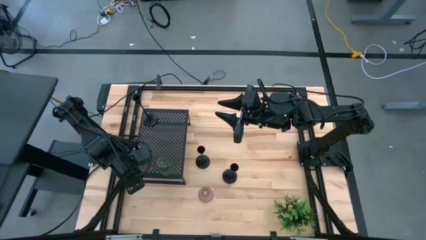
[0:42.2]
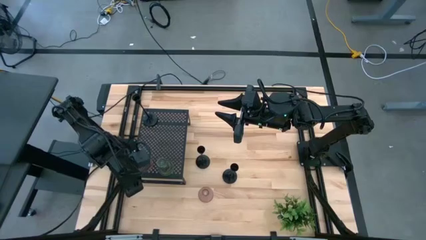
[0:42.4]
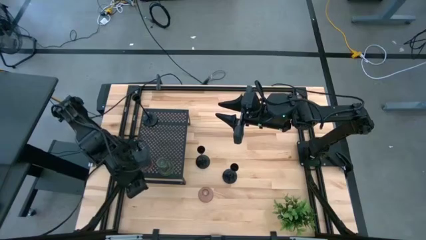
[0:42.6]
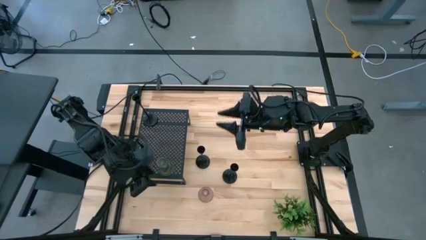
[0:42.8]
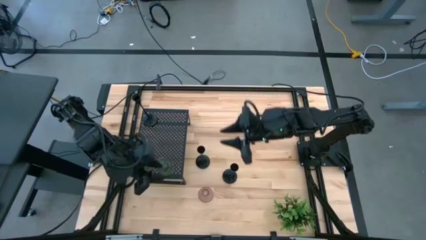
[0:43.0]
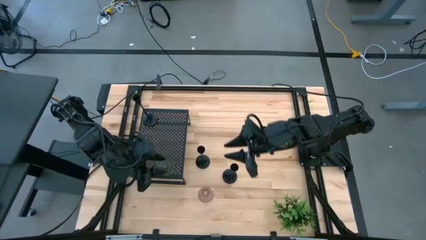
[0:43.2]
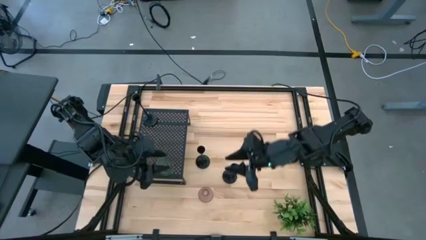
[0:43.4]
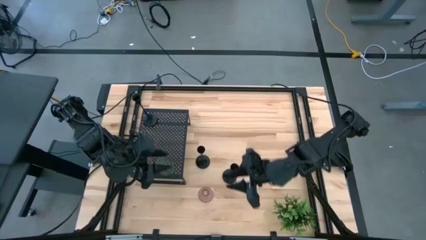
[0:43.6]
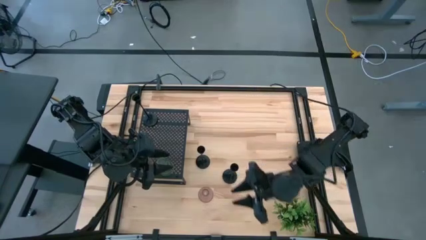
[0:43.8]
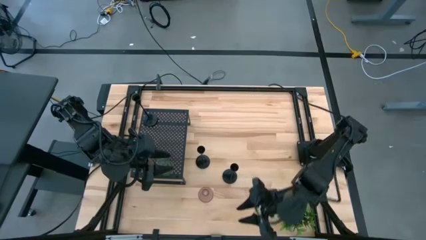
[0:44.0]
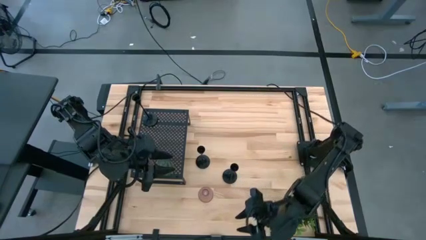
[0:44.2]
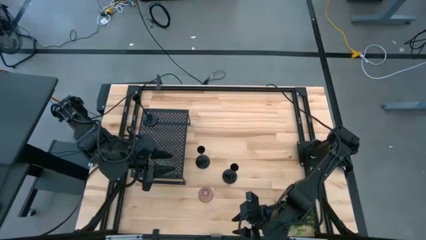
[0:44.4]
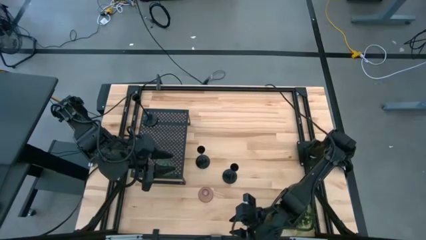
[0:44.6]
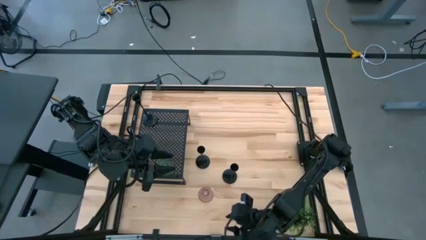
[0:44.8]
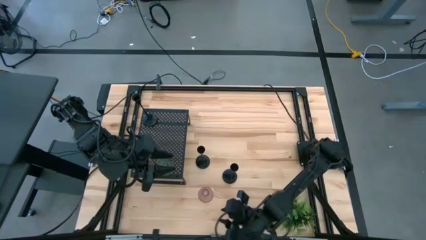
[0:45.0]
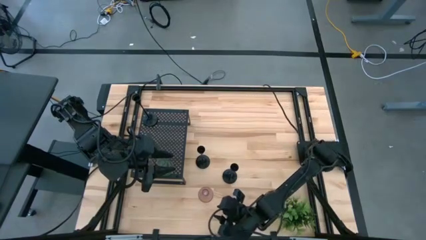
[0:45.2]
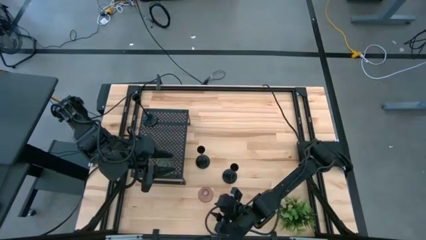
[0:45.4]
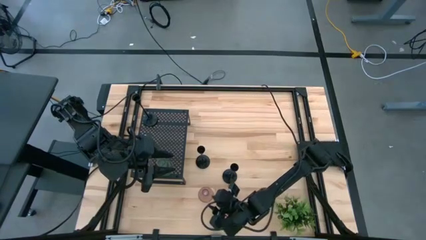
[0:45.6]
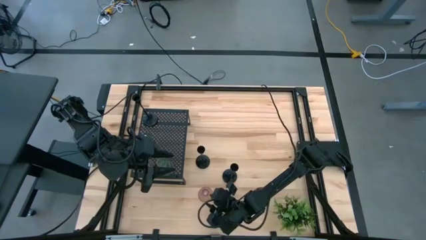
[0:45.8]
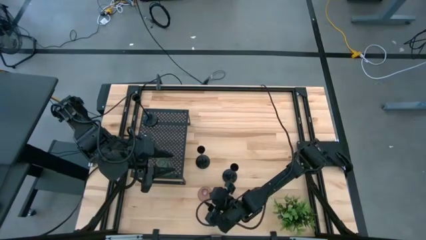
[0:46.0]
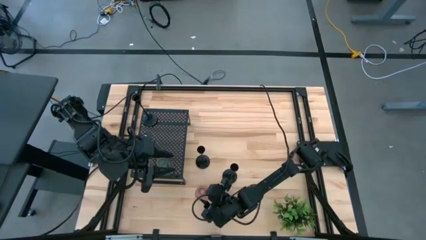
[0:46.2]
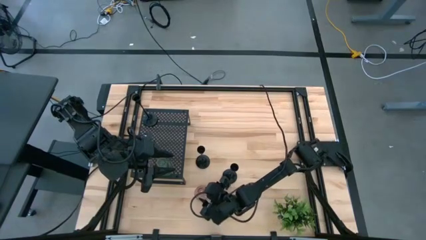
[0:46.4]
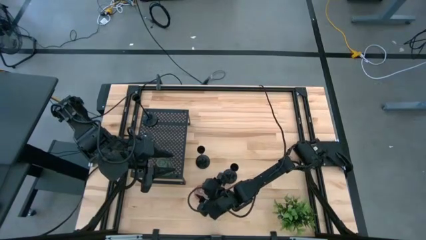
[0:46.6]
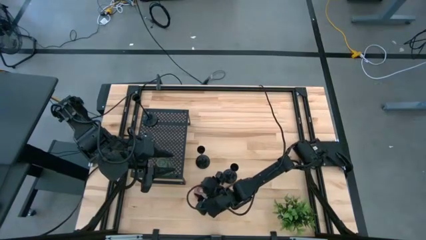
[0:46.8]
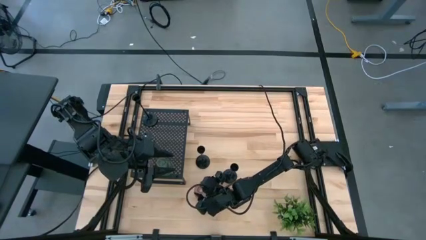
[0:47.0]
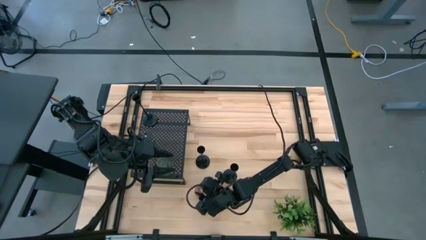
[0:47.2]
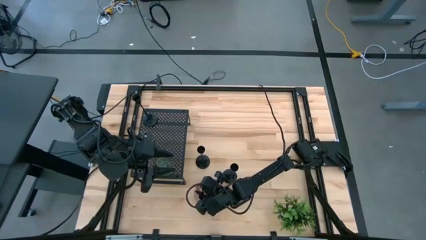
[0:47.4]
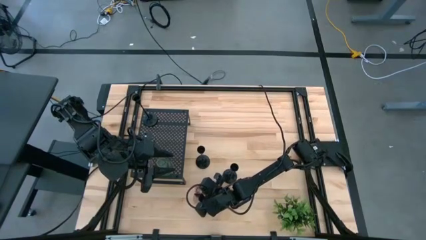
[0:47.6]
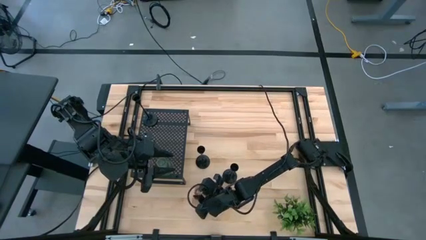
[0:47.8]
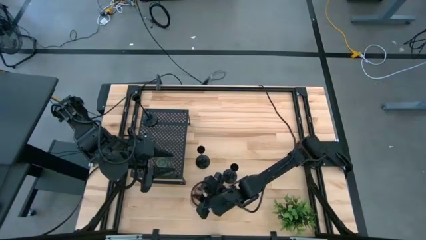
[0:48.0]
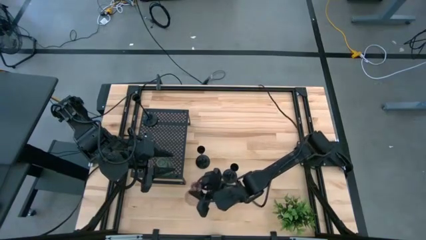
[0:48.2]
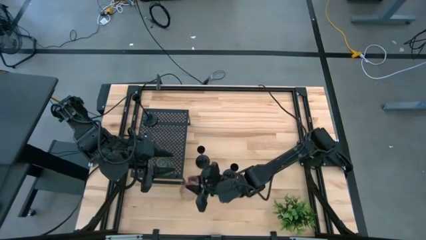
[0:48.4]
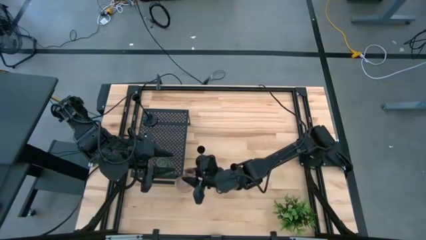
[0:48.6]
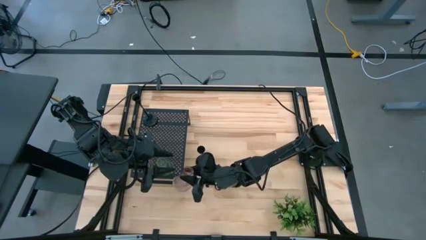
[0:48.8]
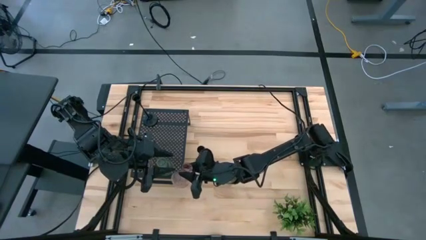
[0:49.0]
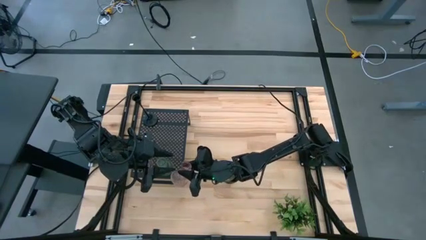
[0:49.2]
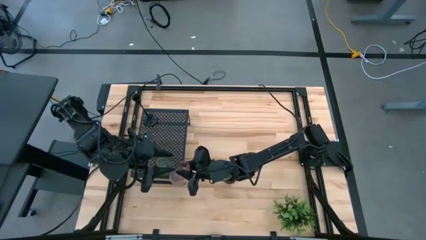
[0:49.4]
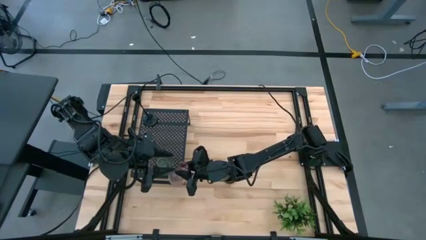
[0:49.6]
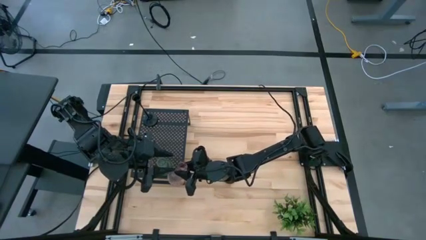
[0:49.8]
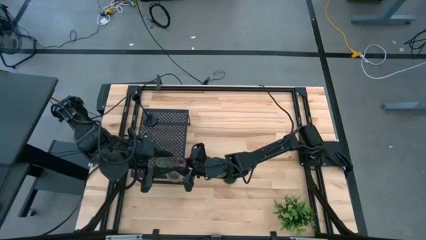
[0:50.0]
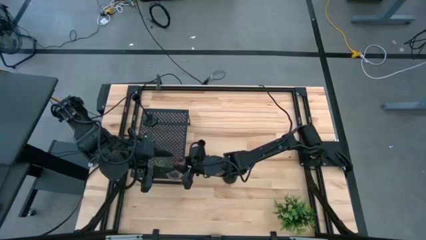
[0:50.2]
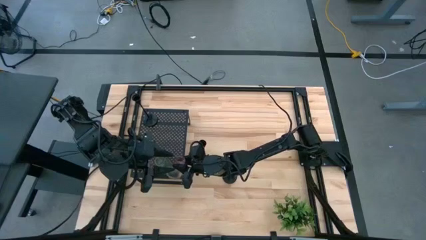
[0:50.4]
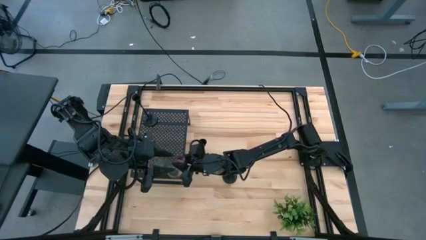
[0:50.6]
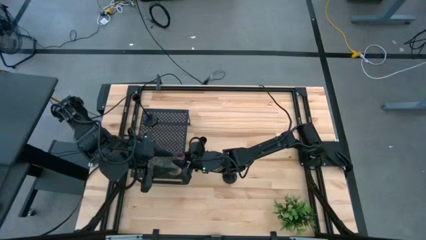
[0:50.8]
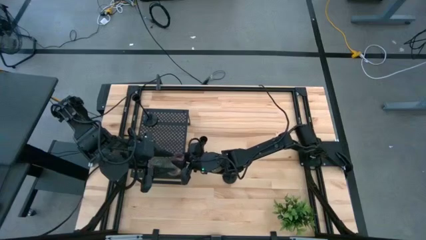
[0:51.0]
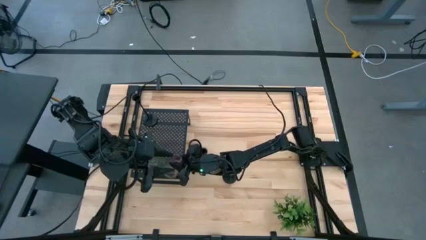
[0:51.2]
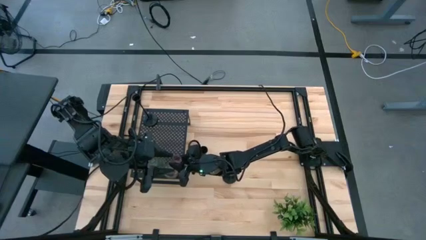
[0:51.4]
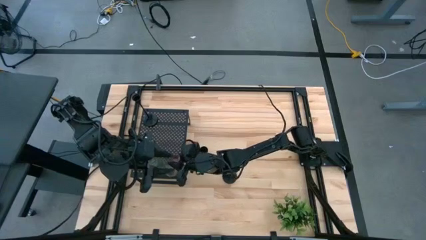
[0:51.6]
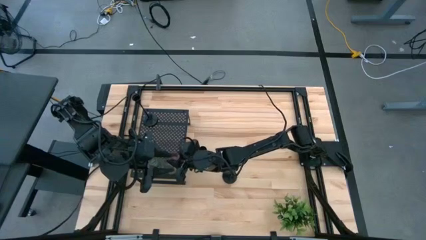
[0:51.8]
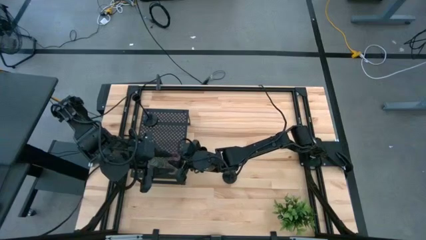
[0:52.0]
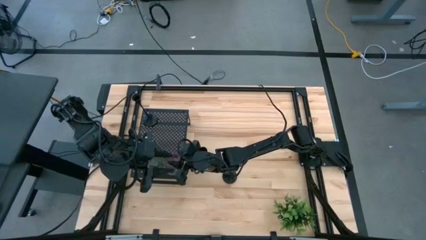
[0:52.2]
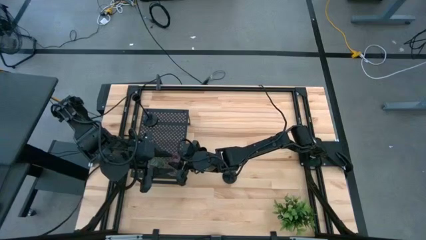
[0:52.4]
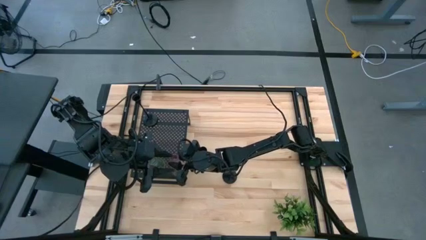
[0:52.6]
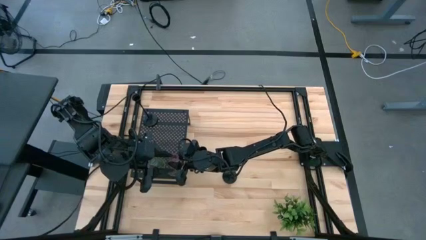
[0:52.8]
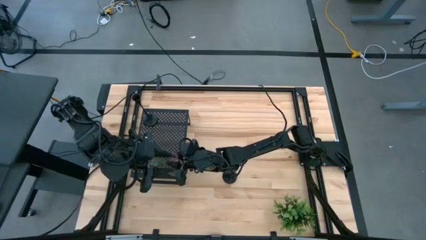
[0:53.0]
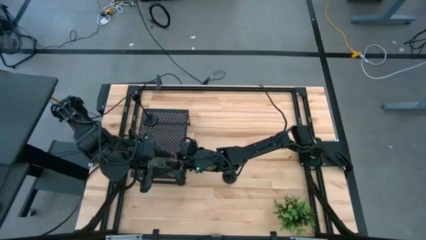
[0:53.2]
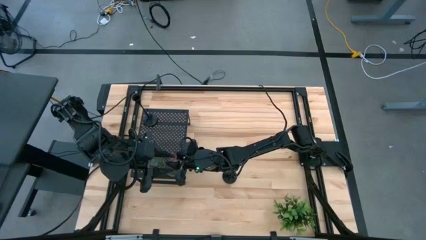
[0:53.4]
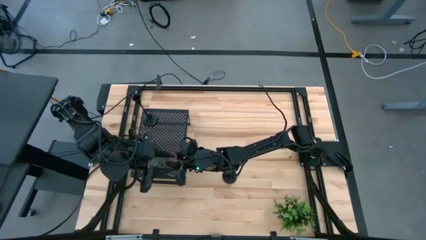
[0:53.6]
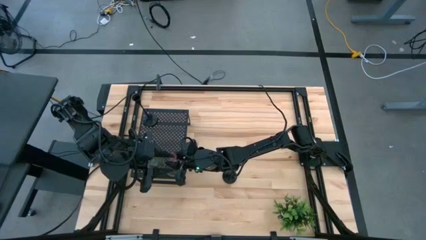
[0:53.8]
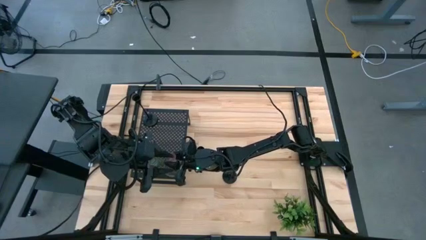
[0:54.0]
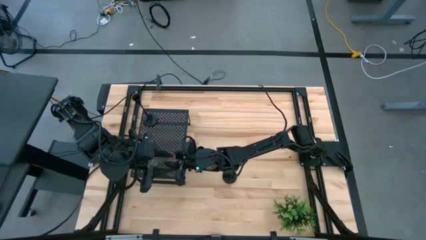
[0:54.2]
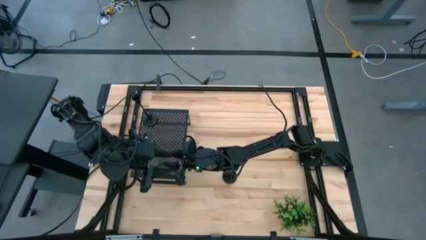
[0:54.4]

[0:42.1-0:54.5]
Task: Pick & Place candle stick holders
Put the pink glass candle holder on the shelf
